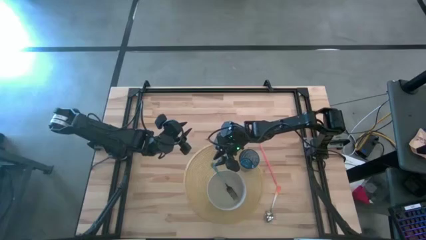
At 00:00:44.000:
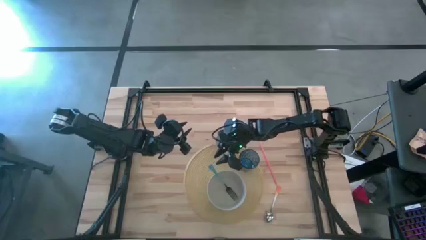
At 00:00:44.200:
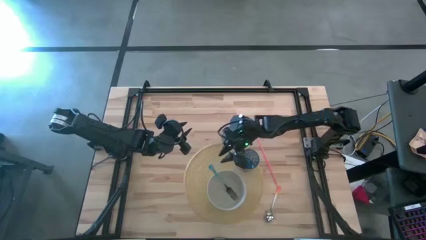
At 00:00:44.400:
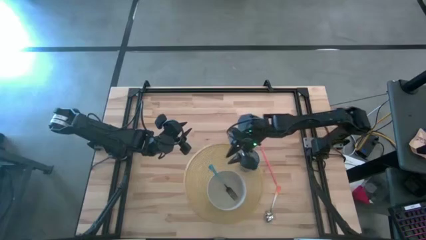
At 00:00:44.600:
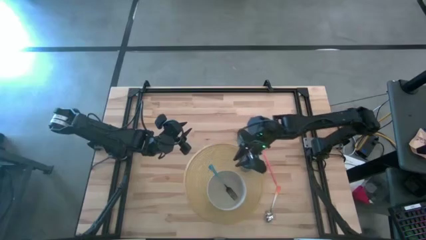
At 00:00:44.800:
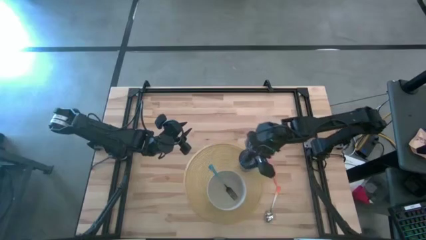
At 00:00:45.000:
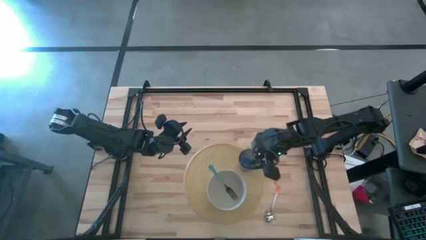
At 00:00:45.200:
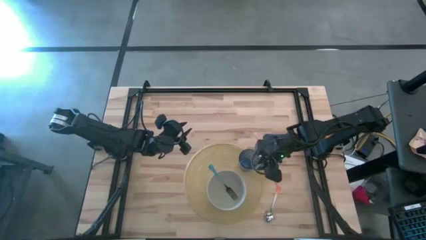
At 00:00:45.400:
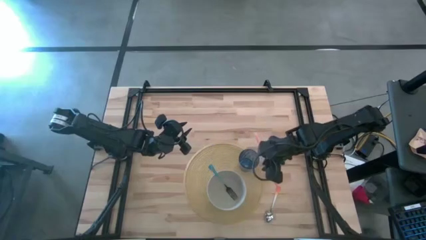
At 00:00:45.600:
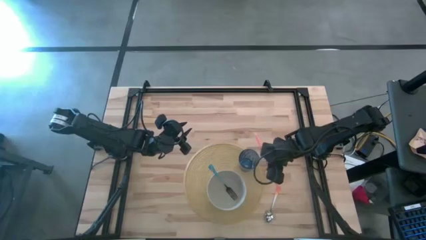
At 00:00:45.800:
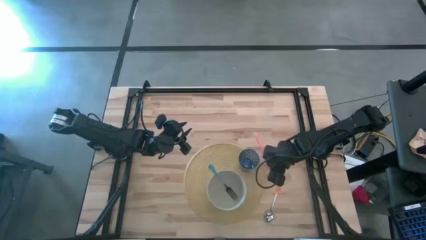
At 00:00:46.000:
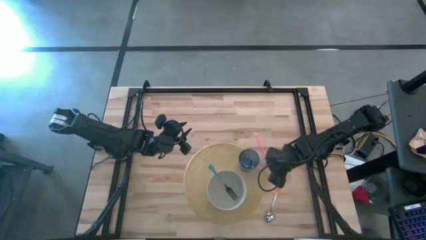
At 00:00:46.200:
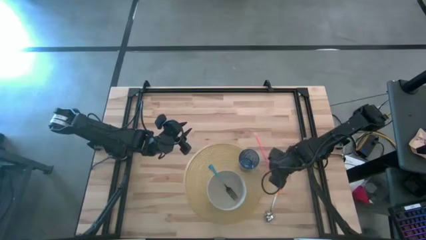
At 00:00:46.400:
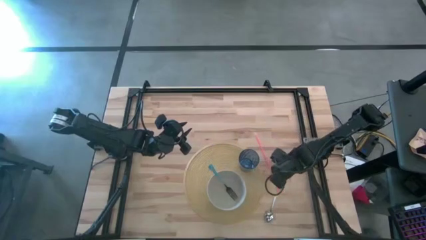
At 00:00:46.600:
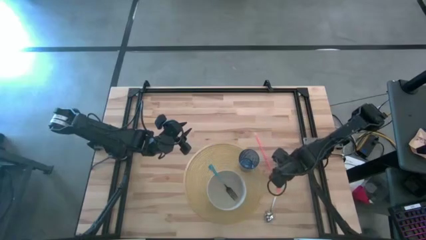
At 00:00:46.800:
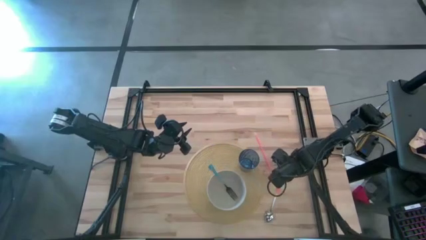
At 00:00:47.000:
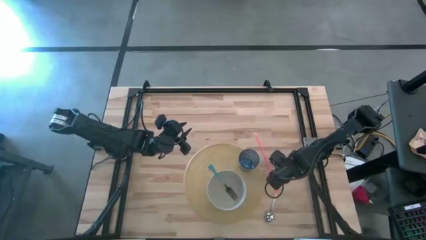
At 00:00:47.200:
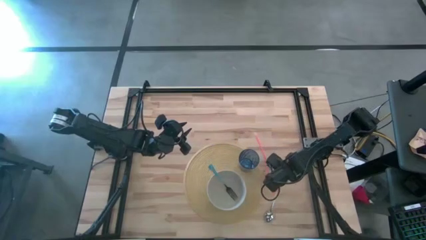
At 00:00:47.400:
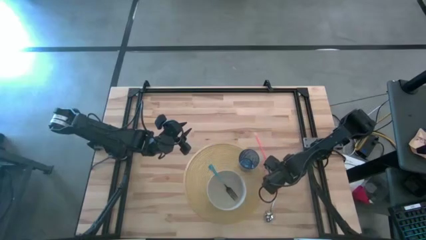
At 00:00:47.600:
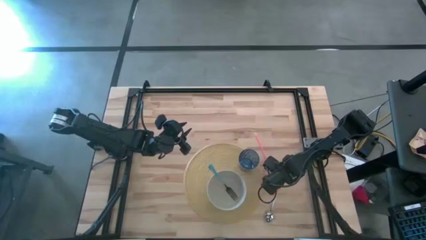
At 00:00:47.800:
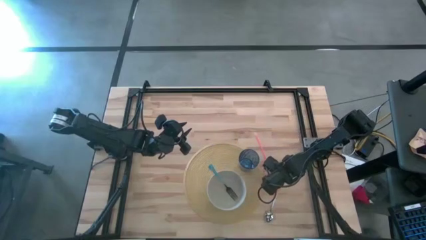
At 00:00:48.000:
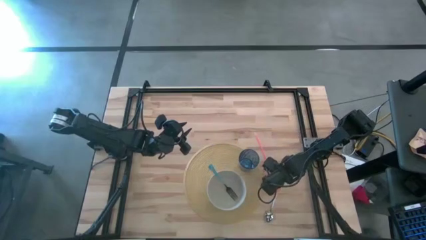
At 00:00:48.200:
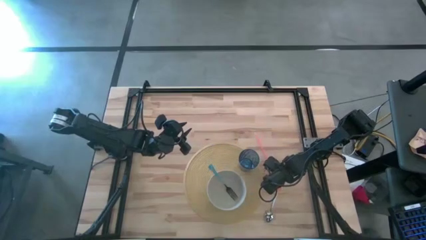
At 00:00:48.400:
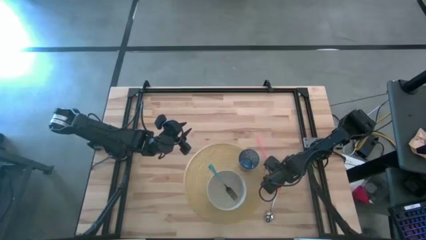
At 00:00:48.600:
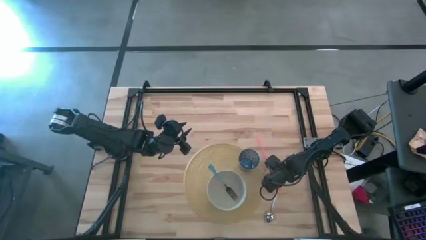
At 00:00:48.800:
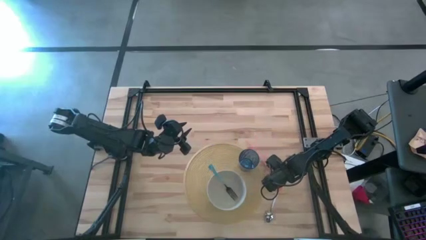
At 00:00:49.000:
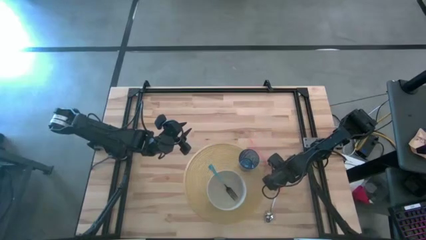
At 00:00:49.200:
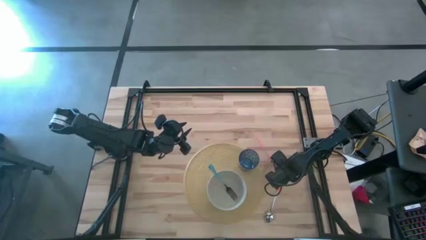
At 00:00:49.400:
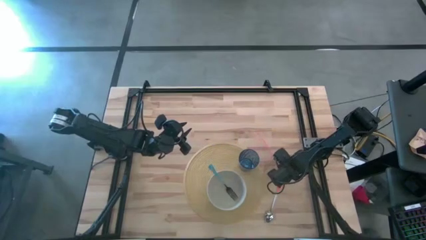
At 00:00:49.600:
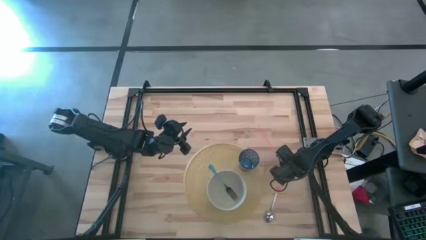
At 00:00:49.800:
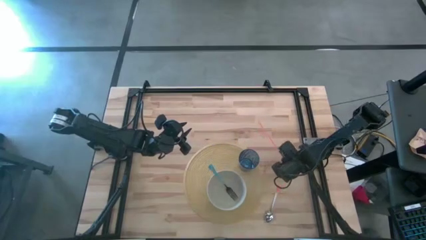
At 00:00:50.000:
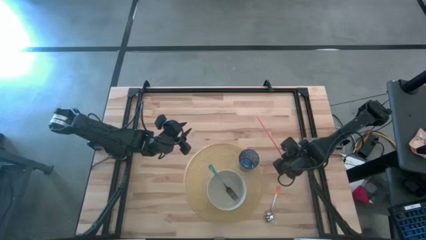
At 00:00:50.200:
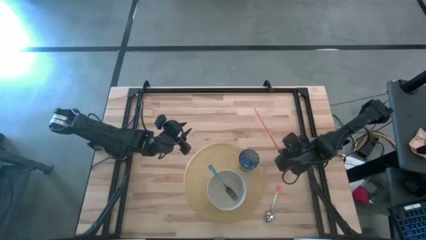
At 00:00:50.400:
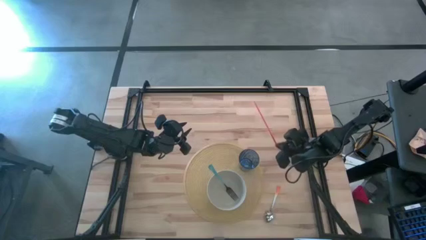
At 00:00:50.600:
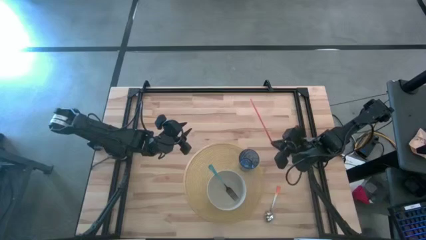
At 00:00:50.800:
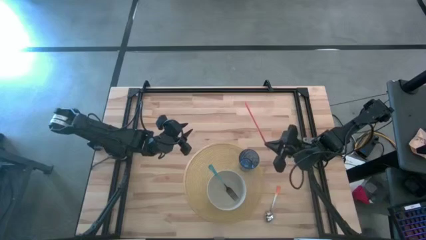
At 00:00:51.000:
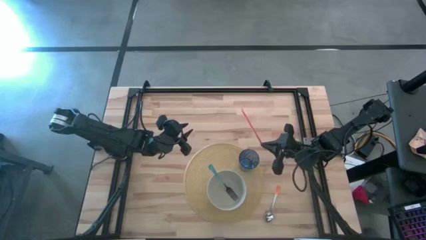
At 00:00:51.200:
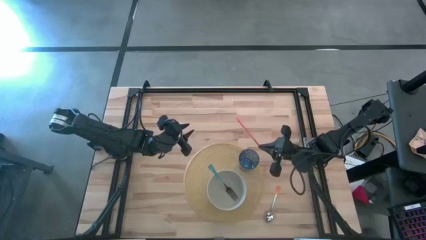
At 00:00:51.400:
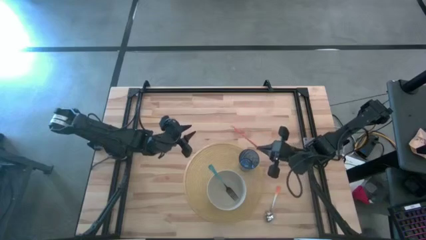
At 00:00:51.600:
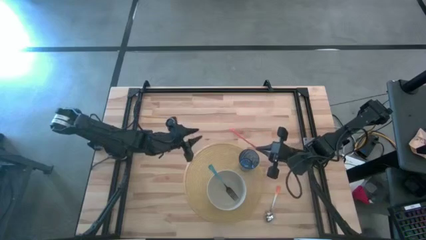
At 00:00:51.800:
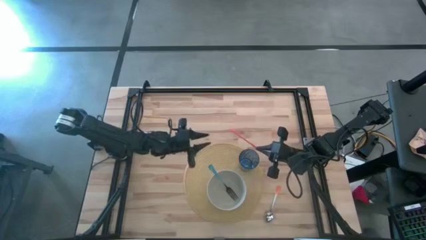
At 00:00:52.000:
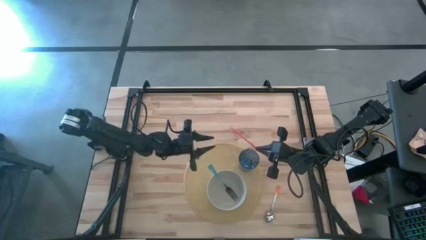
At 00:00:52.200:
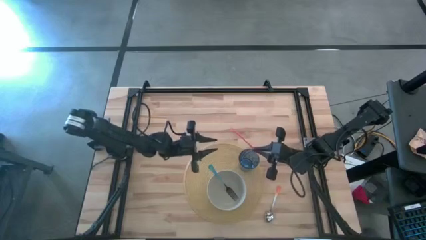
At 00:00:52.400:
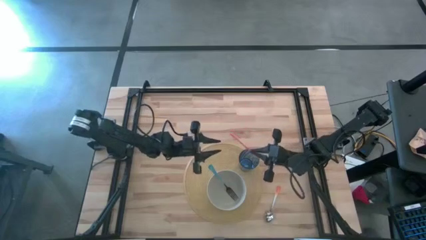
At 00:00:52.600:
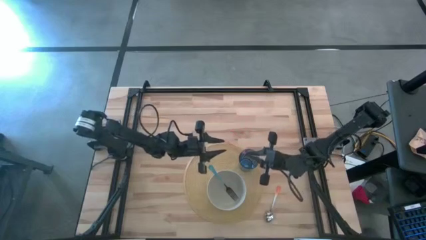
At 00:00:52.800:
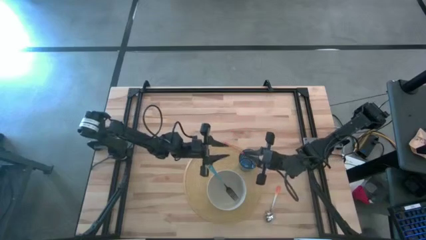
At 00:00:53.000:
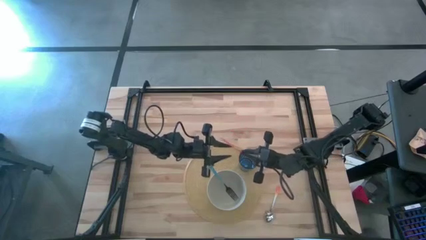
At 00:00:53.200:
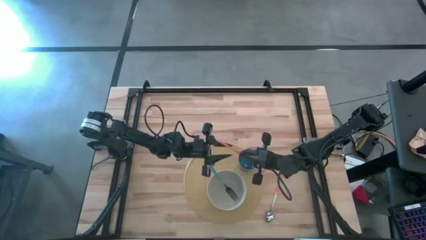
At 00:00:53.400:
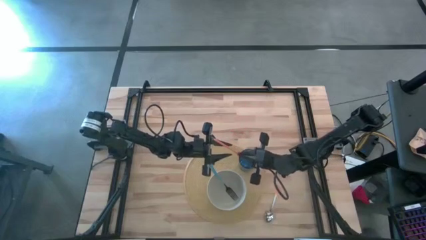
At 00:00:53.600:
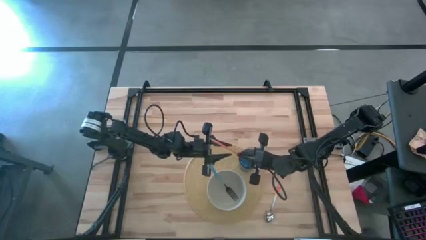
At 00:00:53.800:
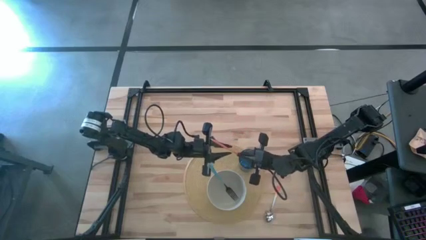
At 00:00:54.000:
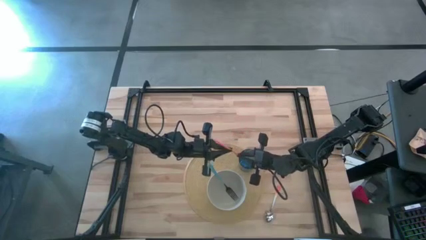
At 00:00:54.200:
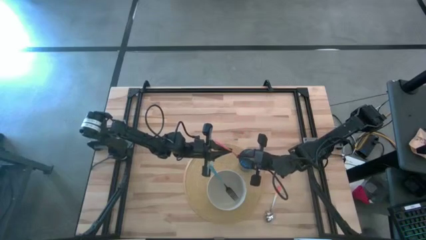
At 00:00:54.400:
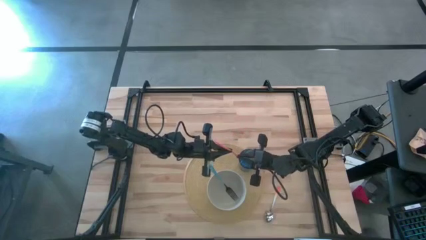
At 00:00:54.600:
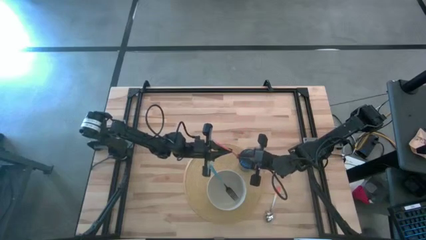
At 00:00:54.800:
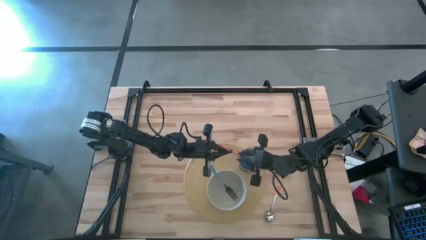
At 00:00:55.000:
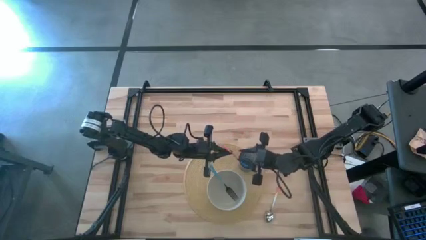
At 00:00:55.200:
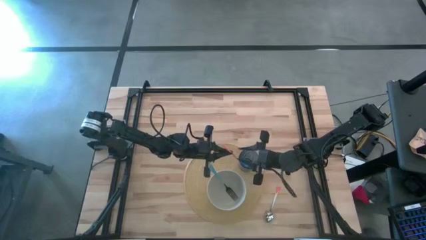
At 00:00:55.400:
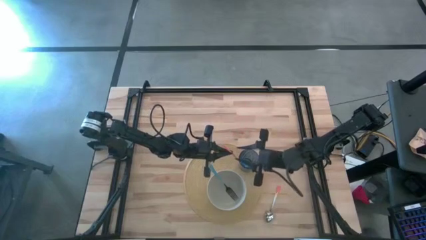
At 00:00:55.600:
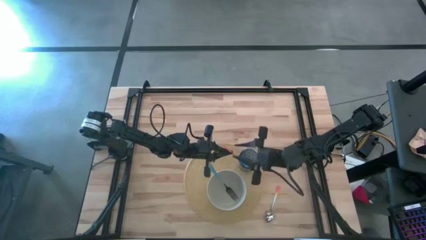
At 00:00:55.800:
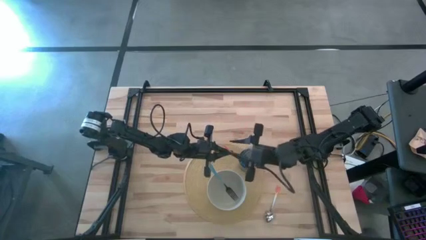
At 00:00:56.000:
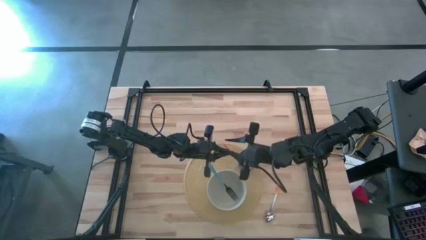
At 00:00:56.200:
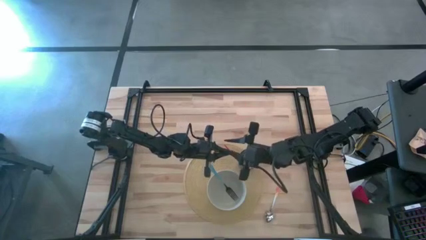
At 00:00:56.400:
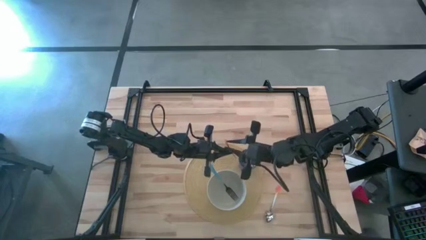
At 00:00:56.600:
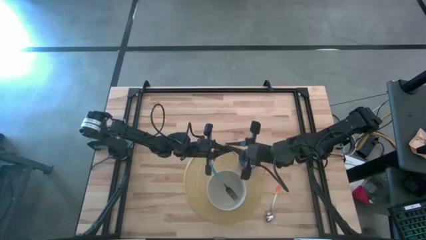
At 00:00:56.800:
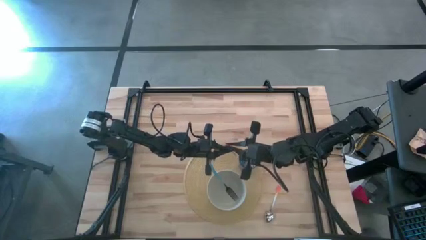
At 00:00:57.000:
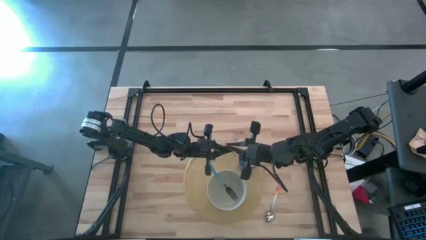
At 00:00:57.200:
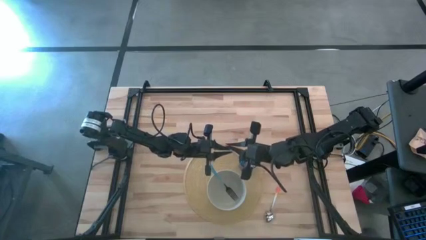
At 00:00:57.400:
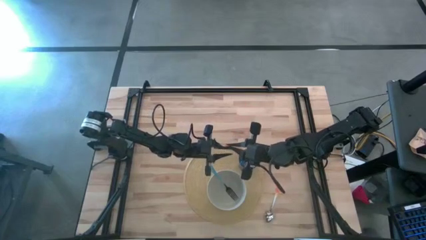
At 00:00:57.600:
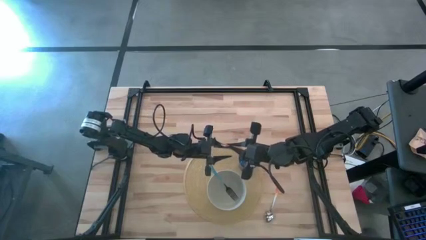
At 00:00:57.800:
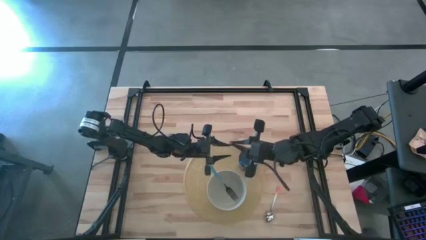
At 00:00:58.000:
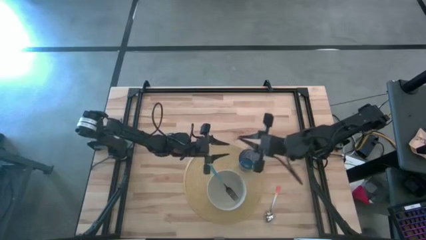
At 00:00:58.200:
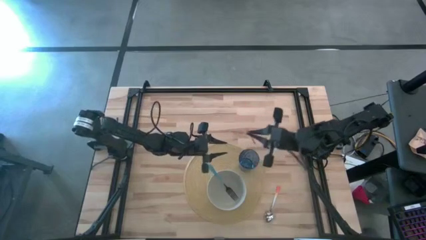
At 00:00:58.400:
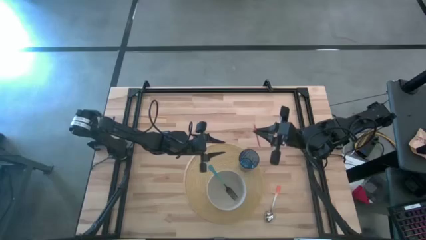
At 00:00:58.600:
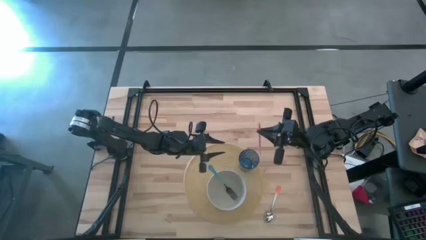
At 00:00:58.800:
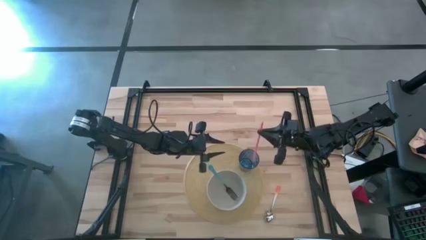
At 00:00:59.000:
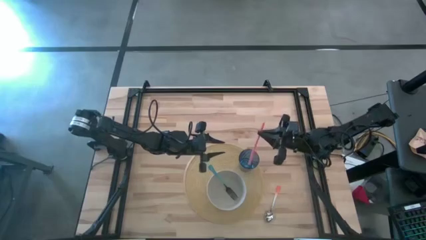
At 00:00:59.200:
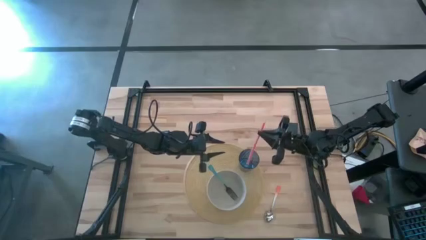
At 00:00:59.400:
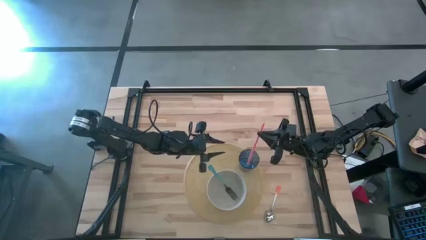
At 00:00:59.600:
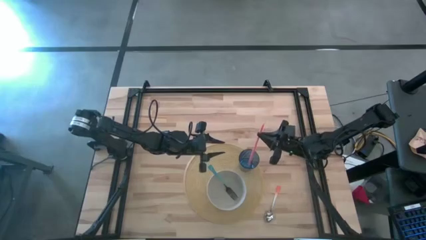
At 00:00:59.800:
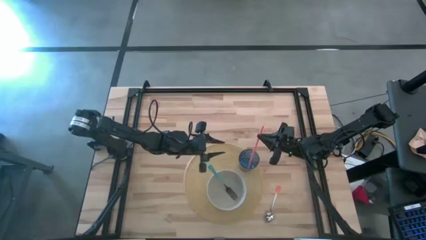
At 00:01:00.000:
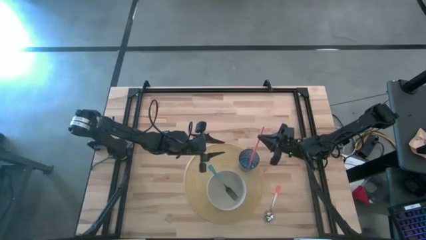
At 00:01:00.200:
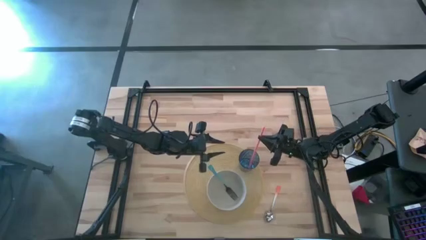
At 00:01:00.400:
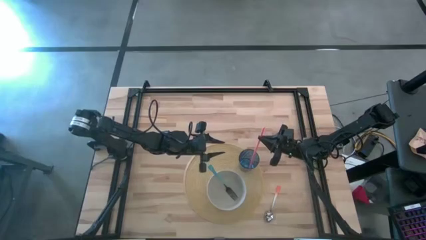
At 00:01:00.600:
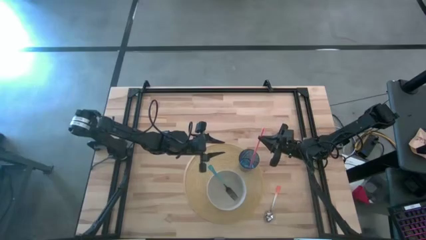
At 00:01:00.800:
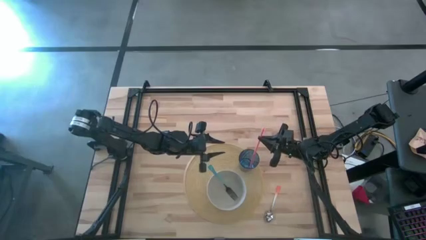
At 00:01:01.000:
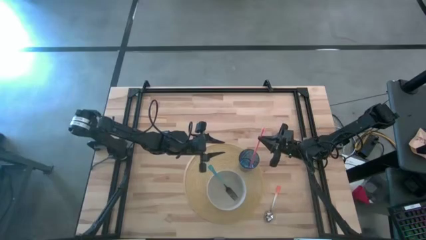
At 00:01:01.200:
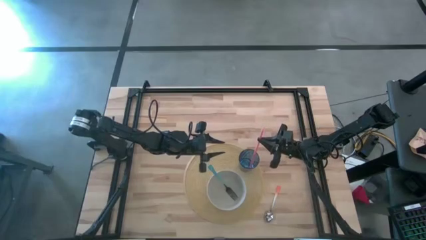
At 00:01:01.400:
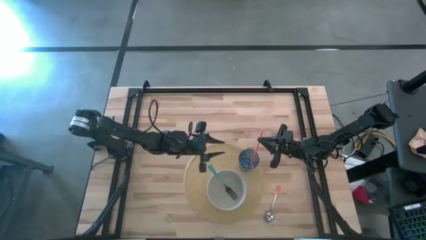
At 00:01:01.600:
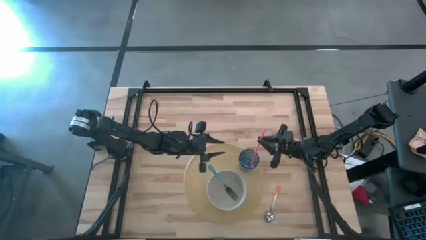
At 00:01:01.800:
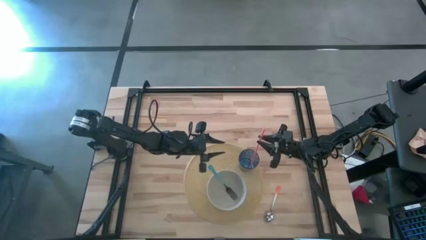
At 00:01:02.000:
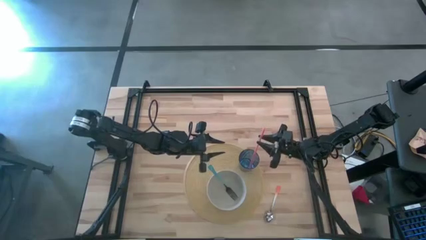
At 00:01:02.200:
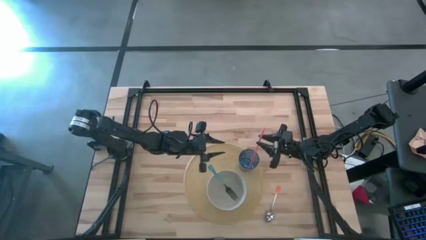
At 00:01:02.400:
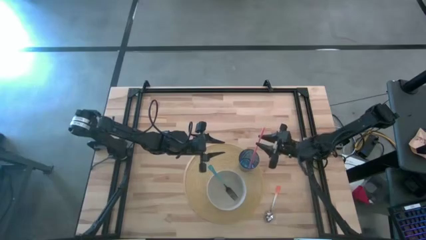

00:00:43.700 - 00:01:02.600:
Task: Pick & Place Utensil
Put the pink straw into the blue cup on the brown mat
